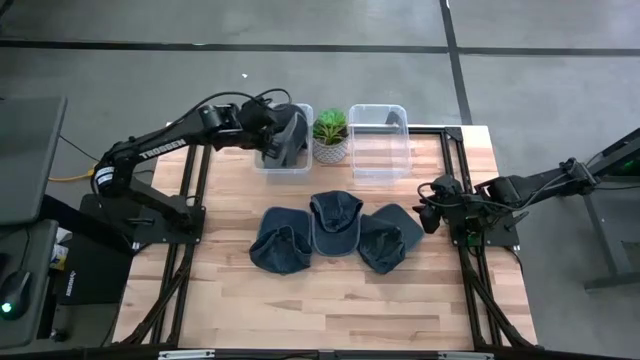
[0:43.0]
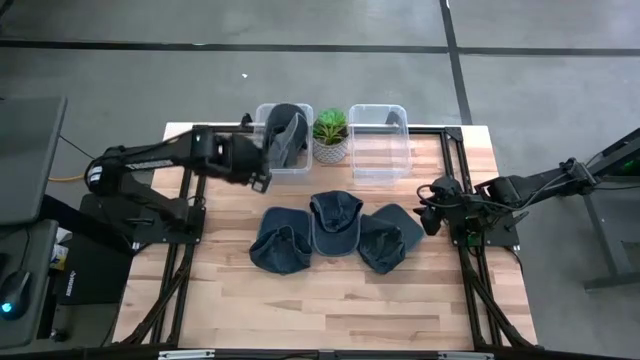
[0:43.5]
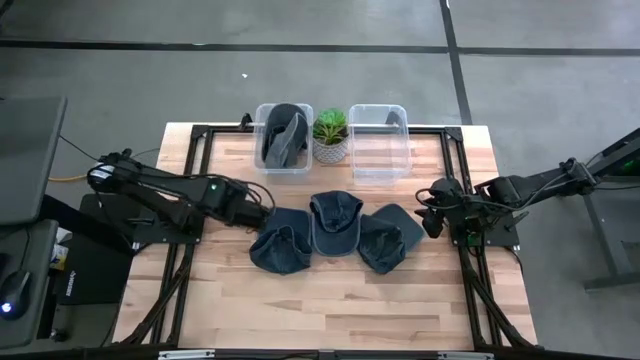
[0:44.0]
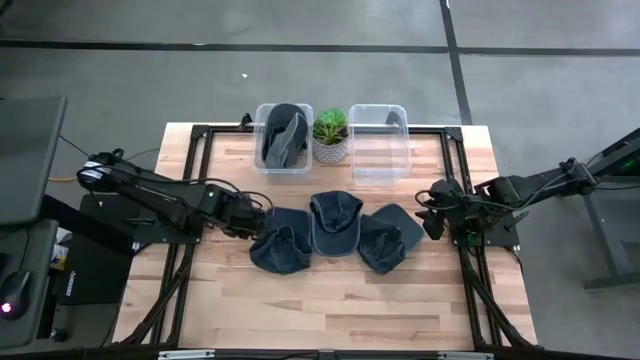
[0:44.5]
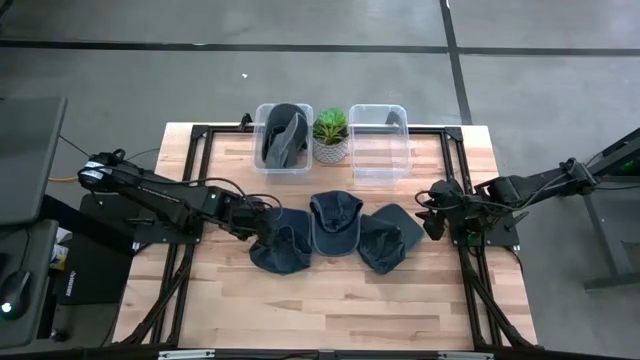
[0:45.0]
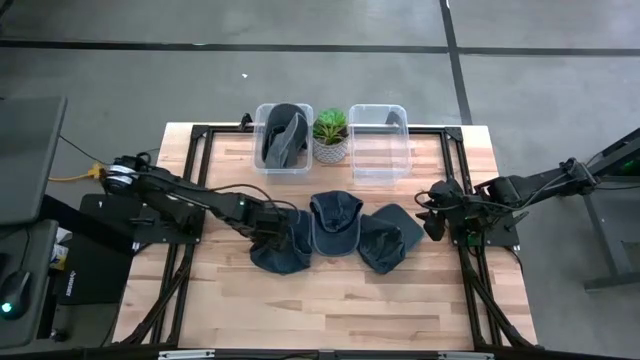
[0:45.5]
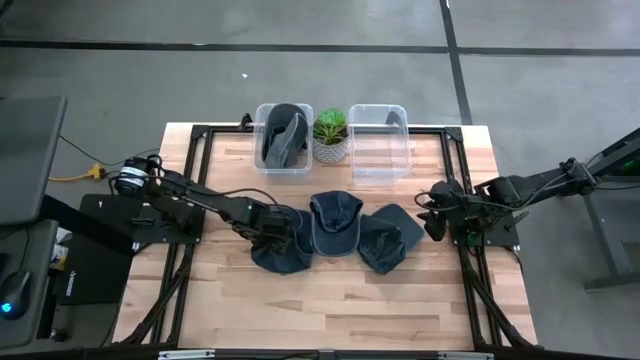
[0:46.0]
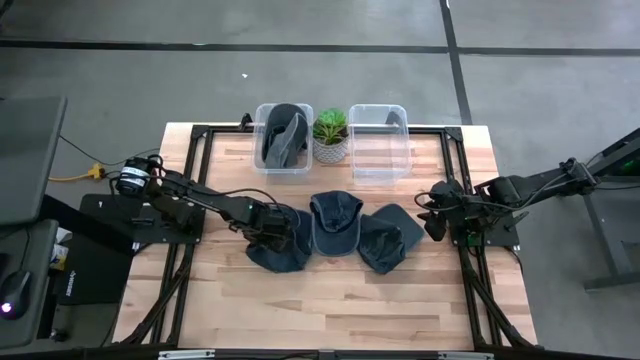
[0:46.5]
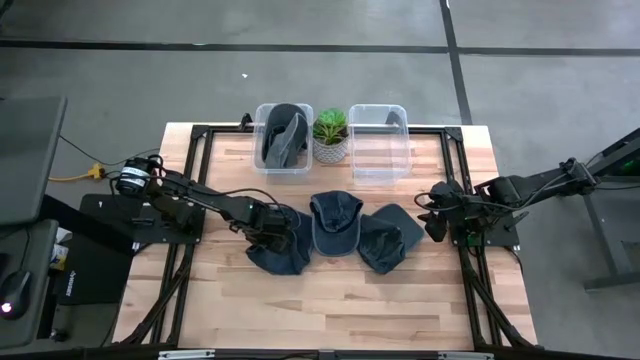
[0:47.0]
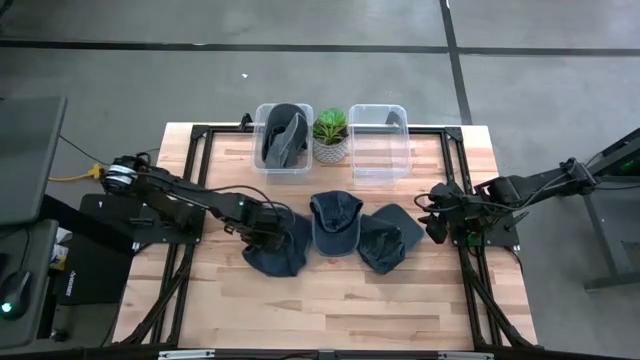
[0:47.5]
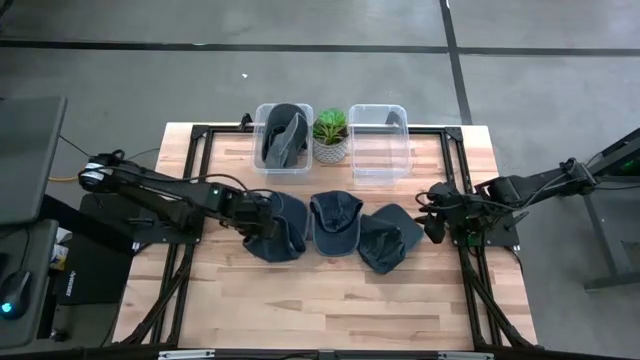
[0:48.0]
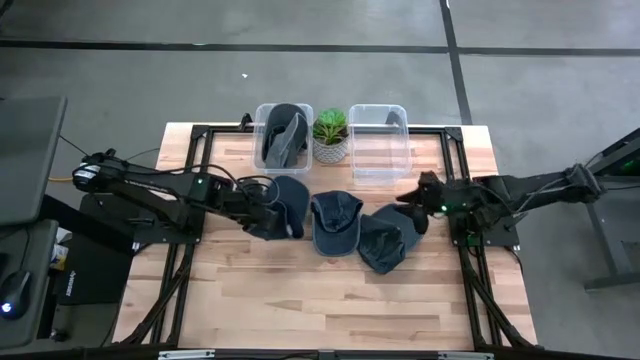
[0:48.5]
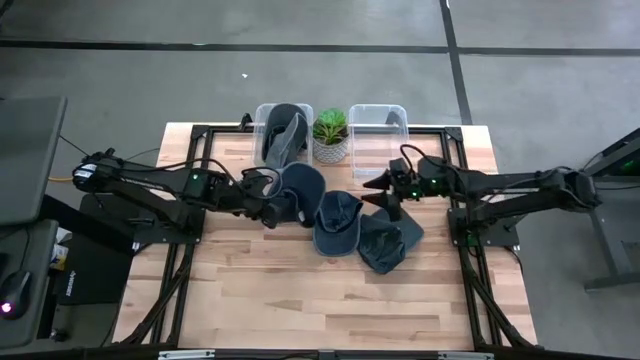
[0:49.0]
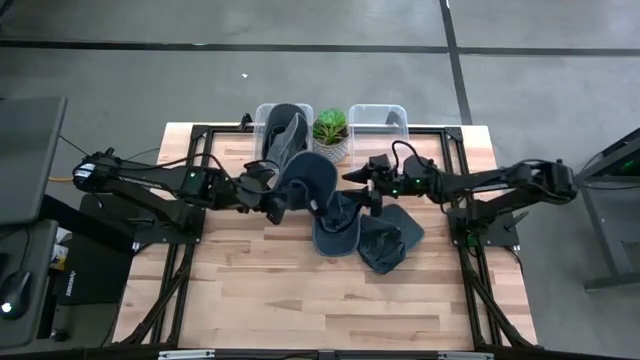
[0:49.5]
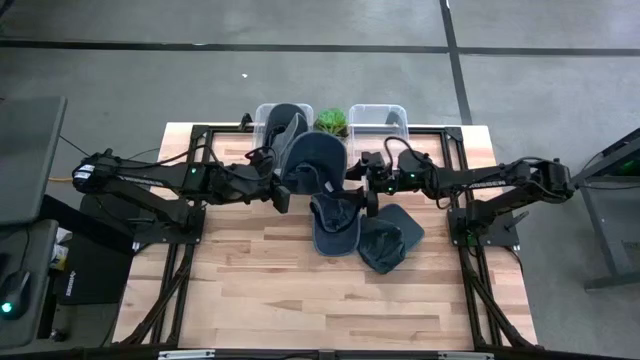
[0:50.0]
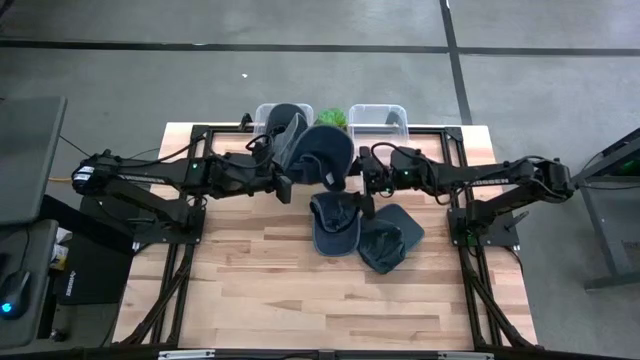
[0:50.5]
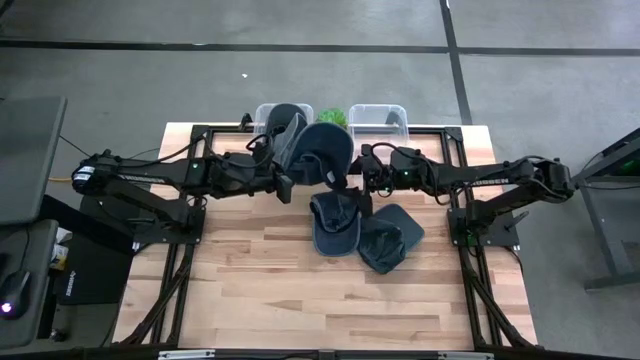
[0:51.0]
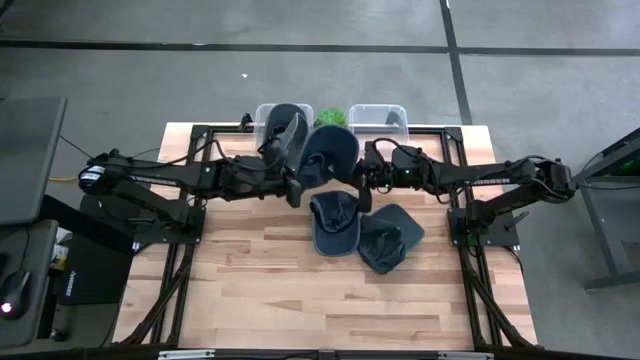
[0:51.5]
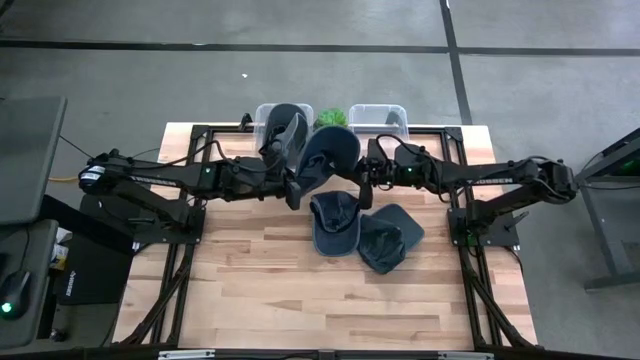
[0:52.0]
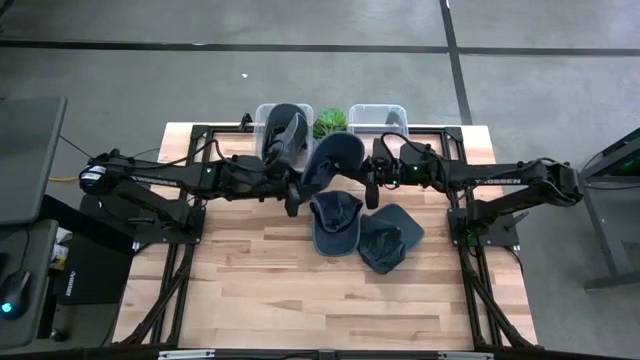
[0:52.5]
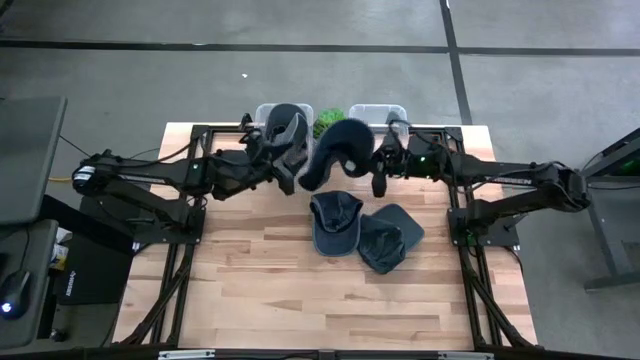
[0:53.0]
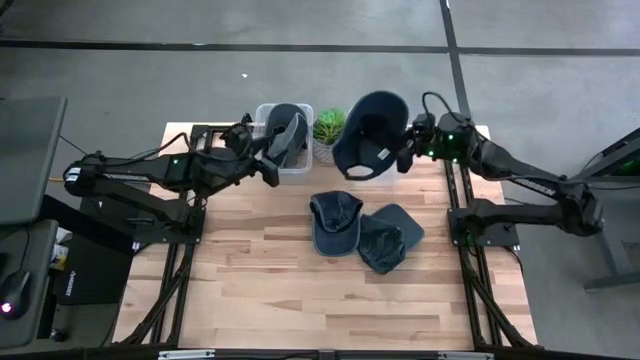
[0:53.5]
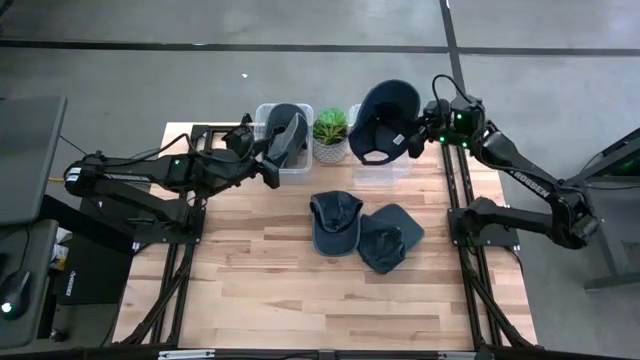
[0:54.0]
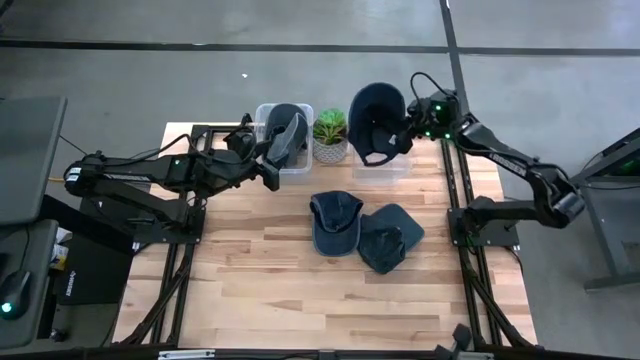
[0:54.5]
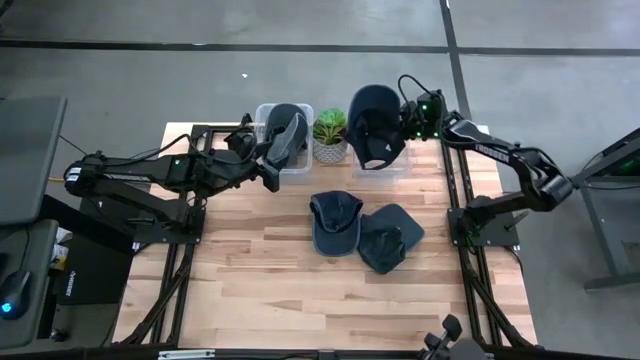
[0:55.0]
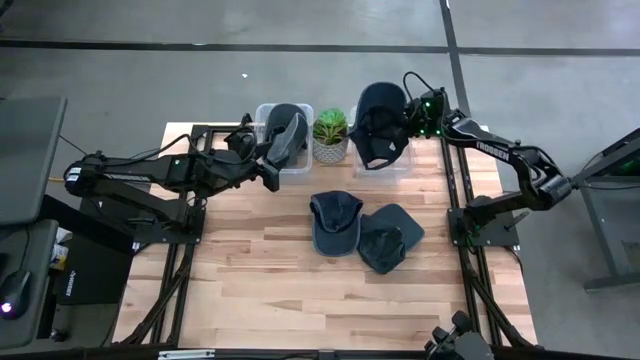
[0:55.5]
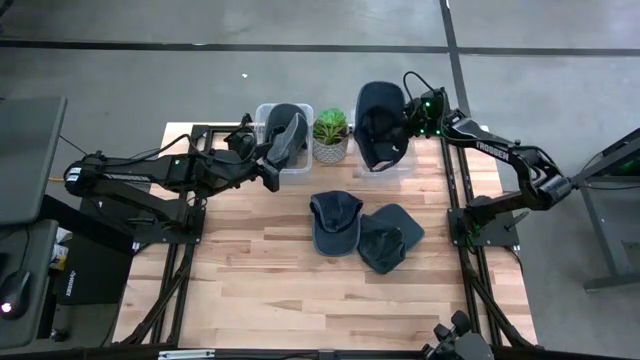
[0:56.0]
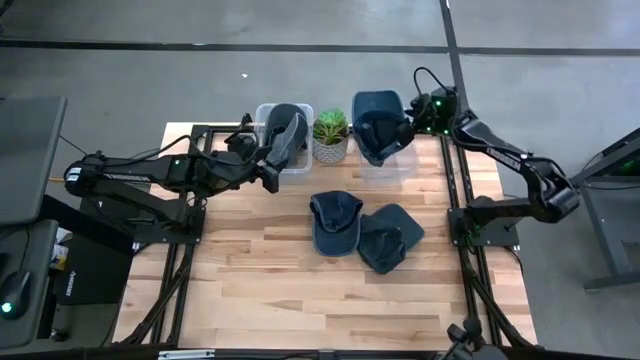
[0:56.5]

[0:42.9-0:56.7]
Task: Pick & Place hat
Put the left blue cap into the right transparent bin

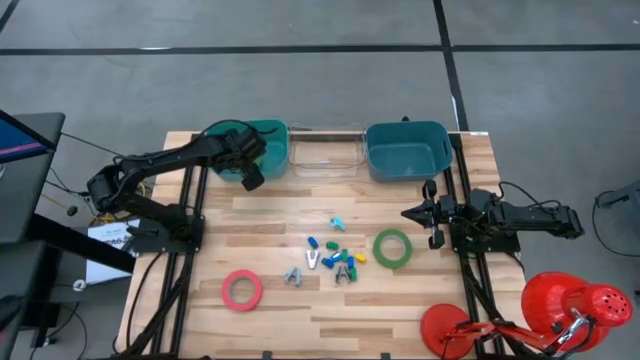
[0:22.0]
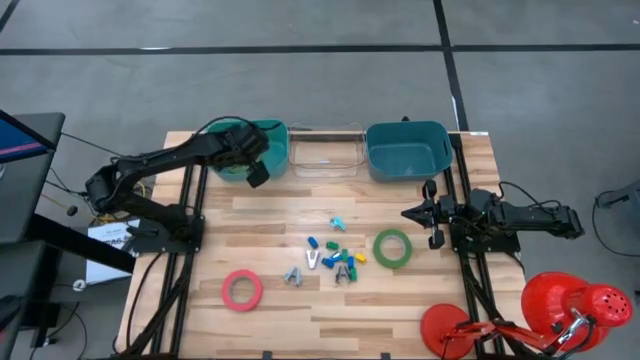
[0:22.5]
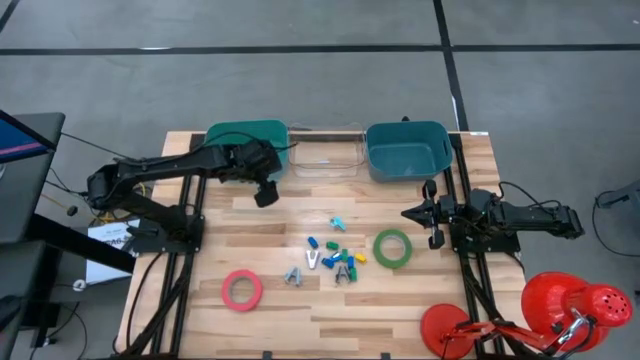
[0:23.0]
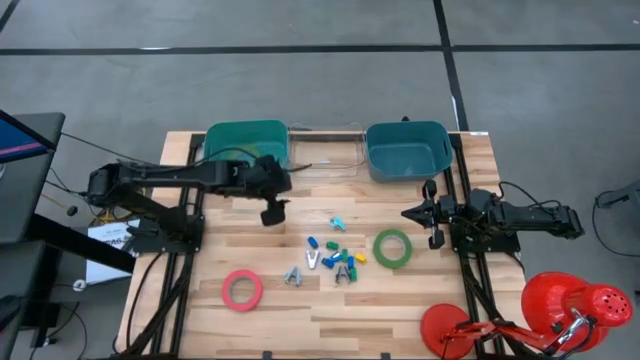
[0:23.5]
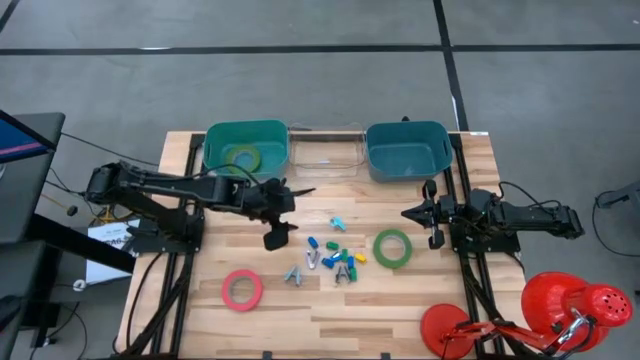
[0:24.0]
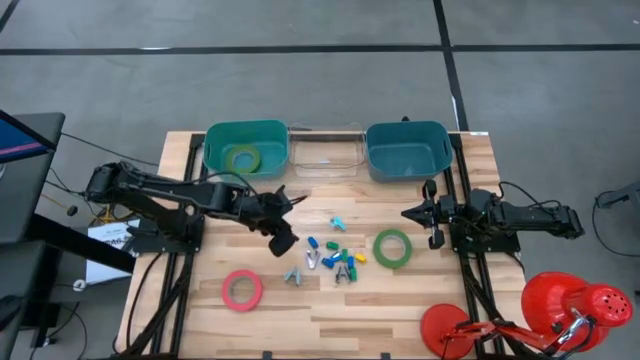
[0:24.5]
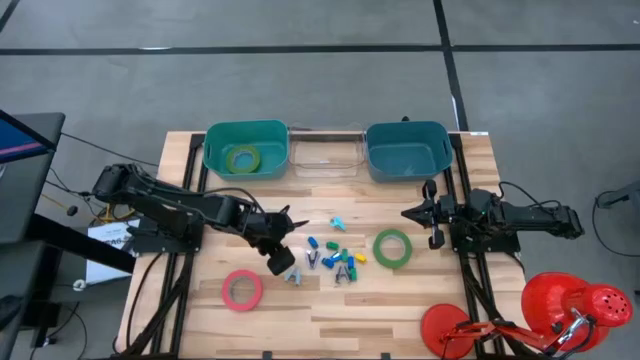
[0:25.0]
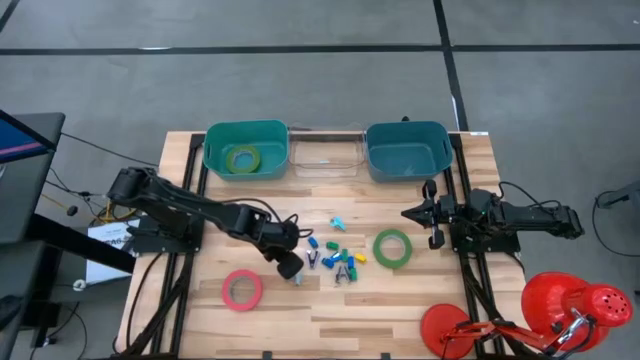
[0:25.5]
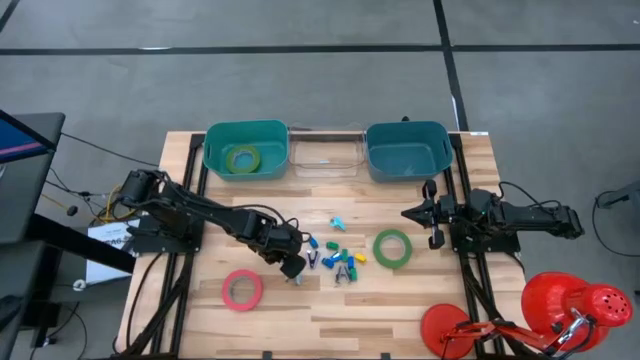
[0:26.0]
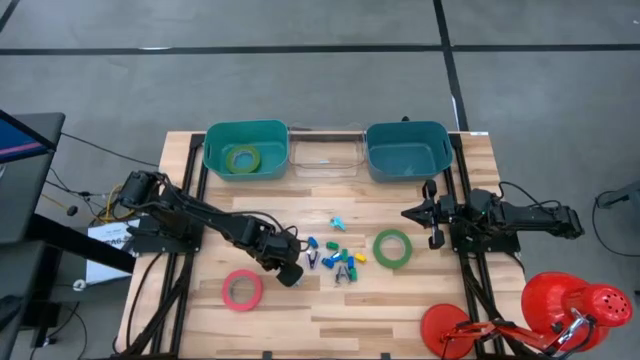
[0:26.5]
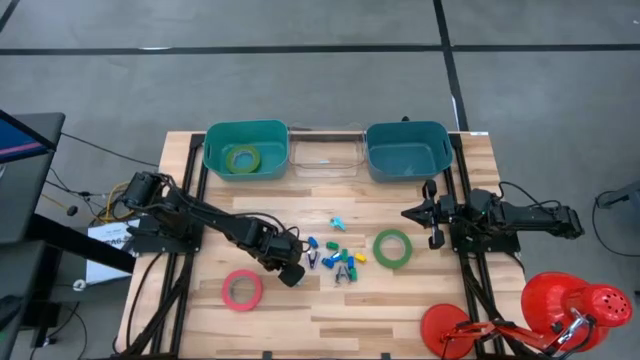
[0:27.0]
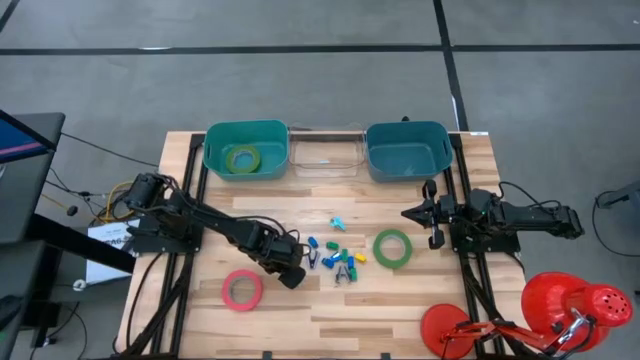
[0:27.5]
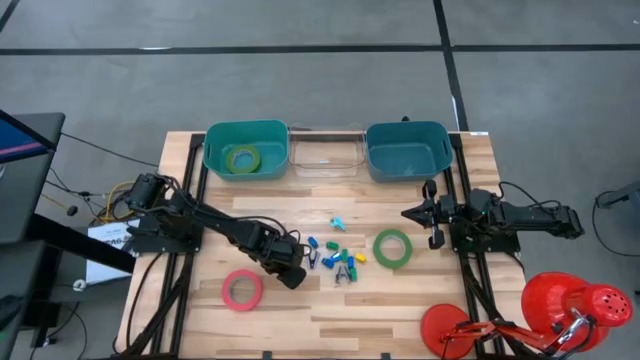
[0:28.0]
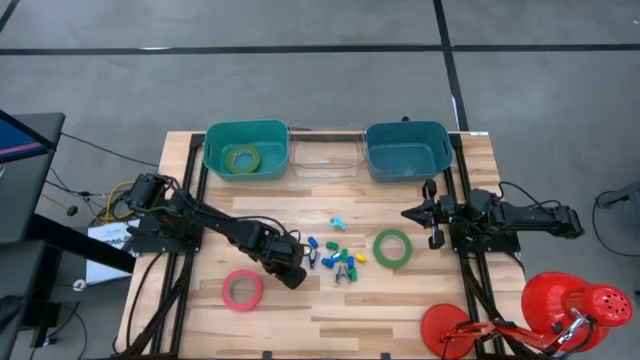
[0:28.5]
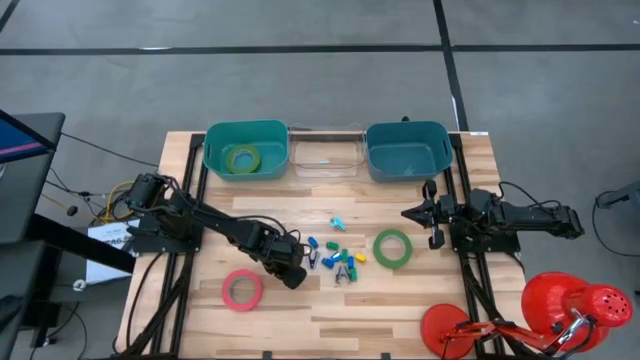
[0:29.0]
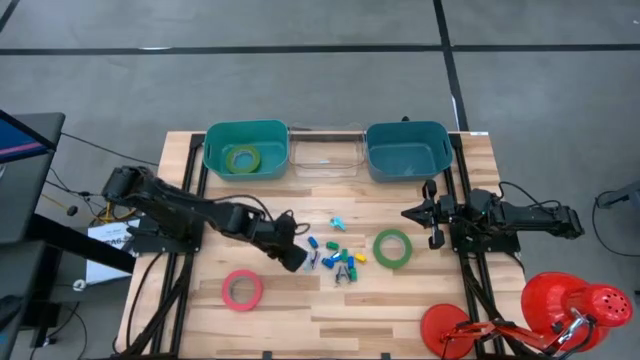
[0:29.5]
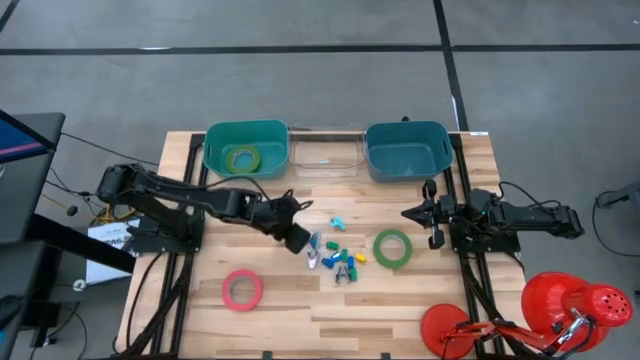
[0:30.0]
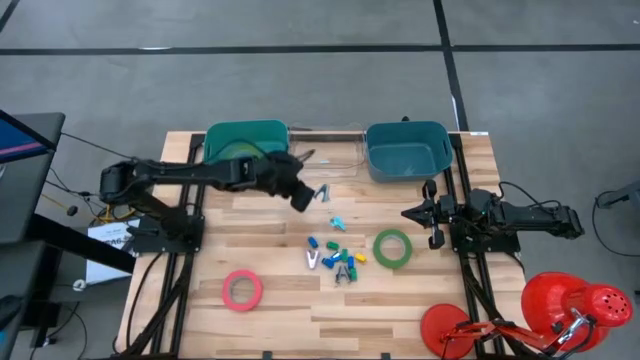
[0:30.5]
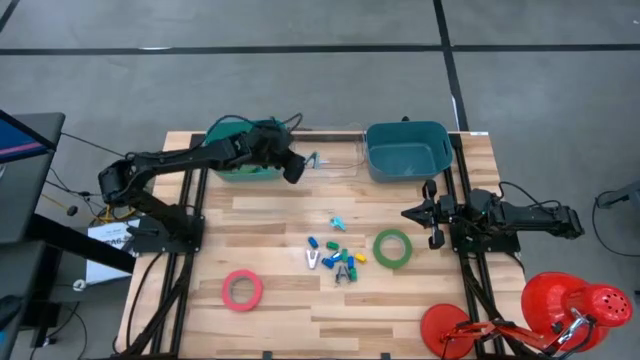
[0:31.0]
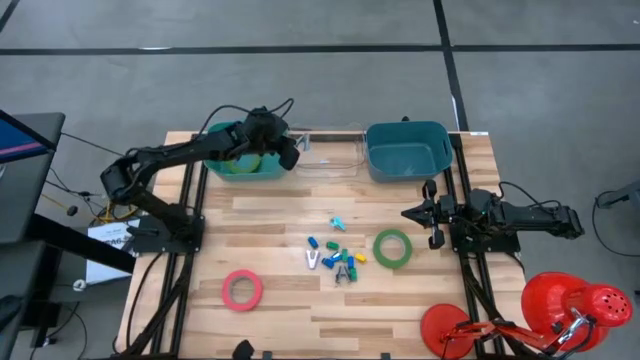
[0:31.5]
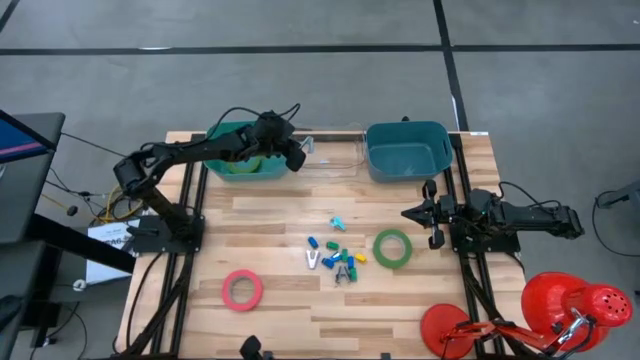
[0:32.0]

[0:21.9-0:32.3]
Task: Pick and place Stapler, Stapler remover, tape
Put the light blue staple remover into the transparent bin
